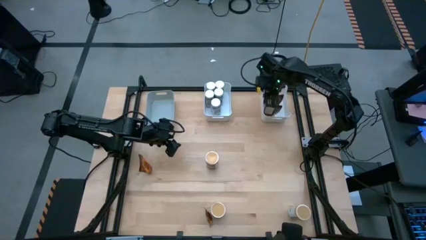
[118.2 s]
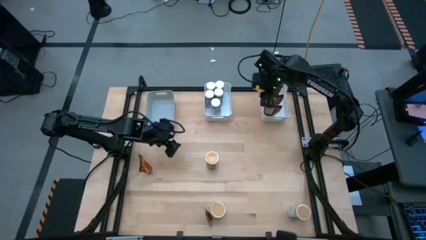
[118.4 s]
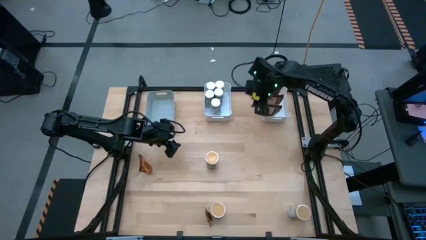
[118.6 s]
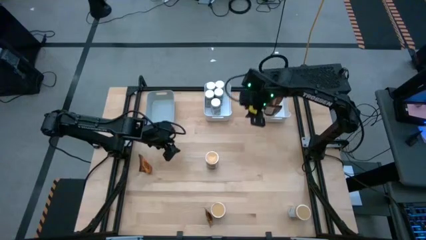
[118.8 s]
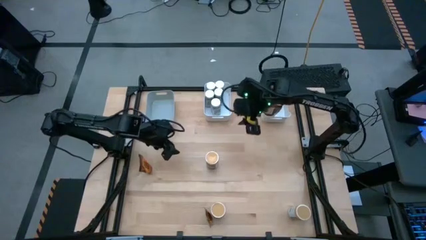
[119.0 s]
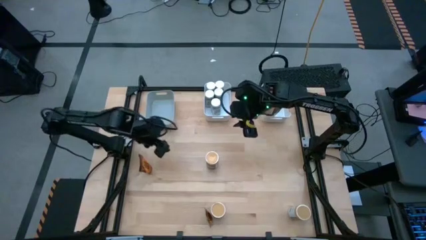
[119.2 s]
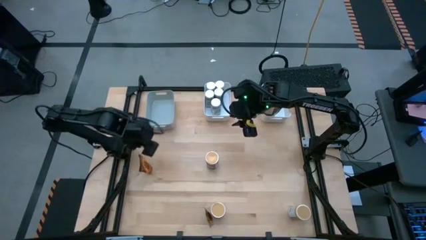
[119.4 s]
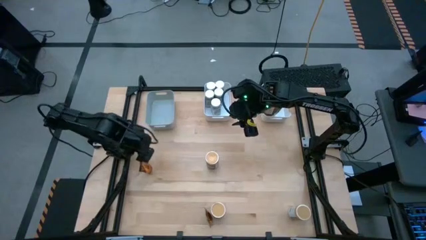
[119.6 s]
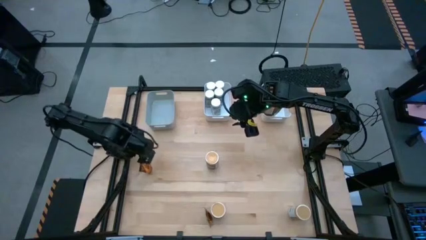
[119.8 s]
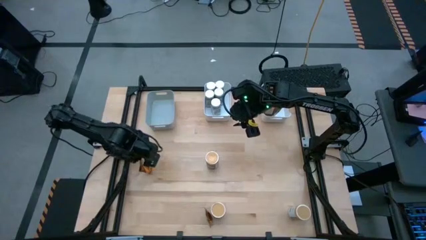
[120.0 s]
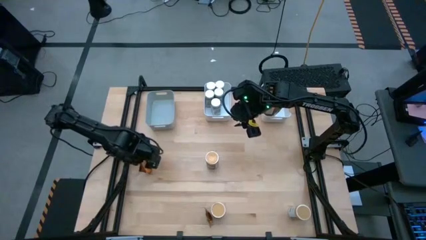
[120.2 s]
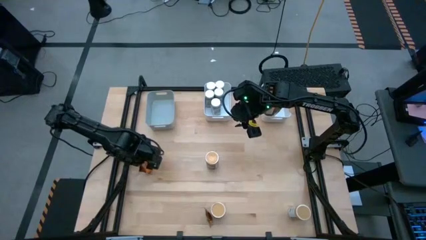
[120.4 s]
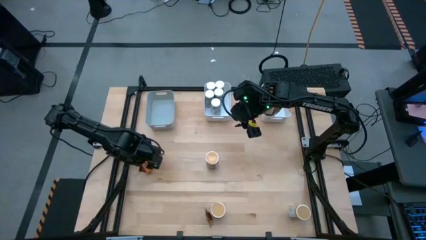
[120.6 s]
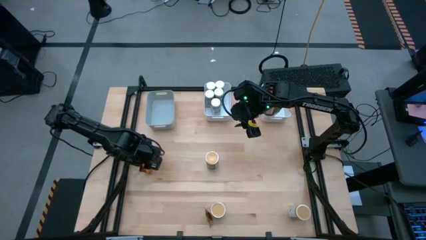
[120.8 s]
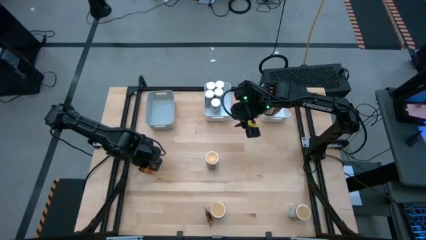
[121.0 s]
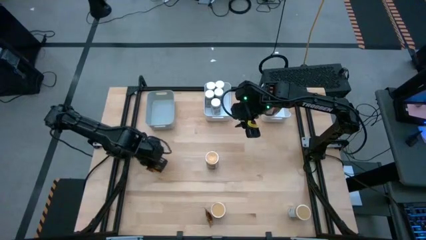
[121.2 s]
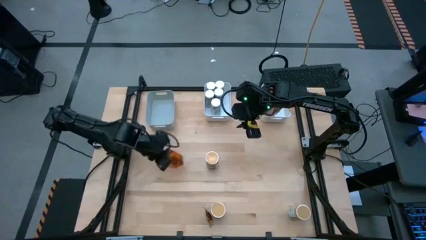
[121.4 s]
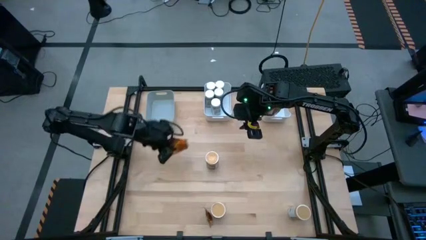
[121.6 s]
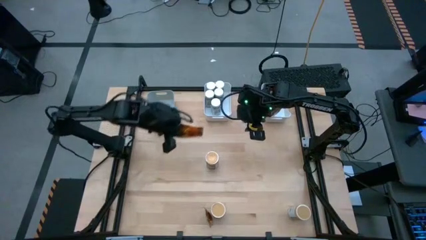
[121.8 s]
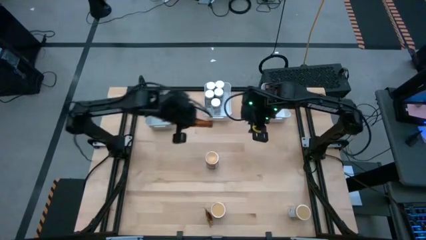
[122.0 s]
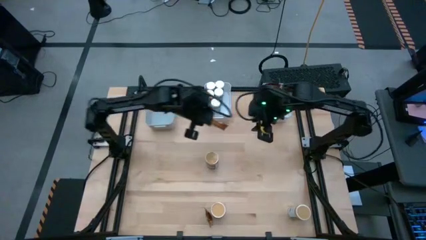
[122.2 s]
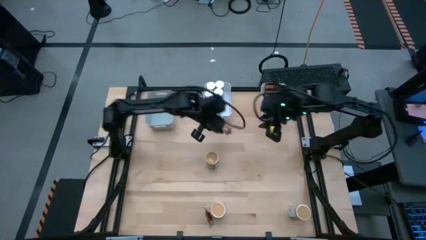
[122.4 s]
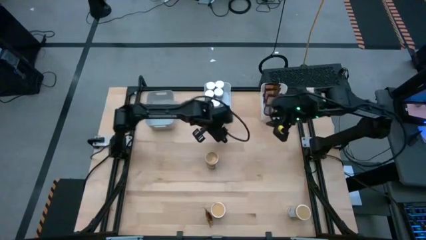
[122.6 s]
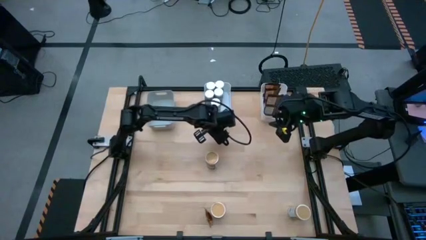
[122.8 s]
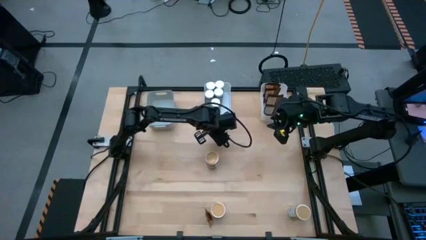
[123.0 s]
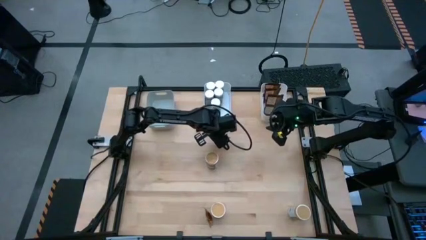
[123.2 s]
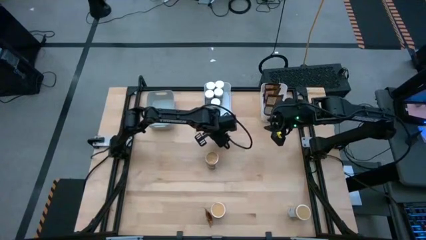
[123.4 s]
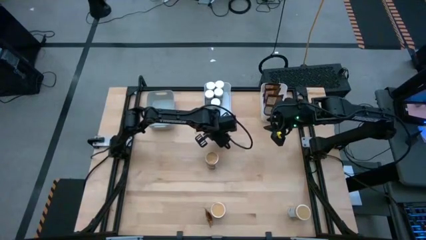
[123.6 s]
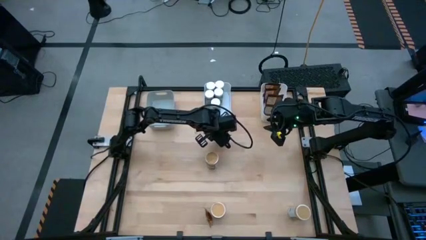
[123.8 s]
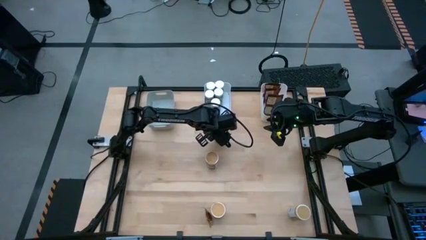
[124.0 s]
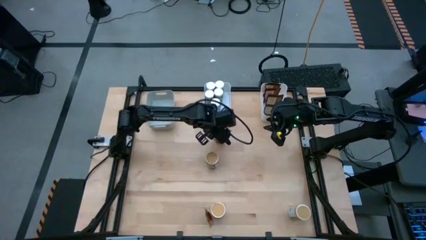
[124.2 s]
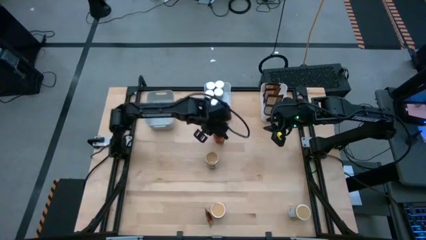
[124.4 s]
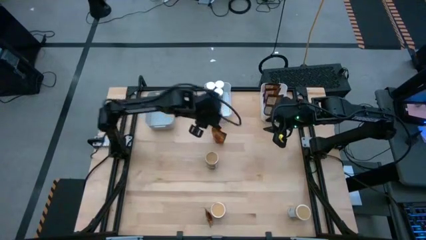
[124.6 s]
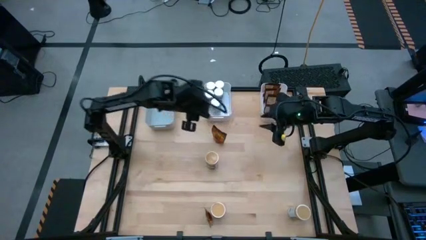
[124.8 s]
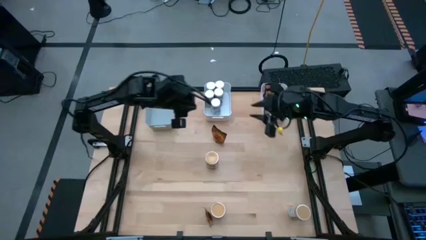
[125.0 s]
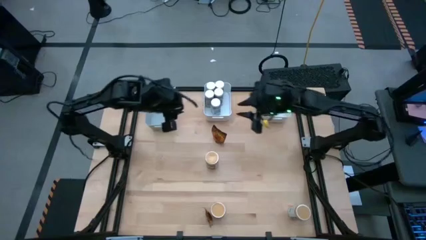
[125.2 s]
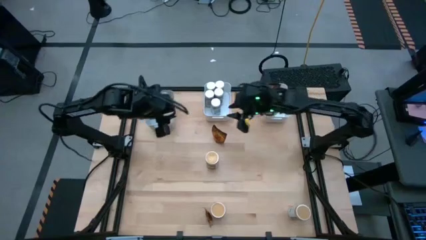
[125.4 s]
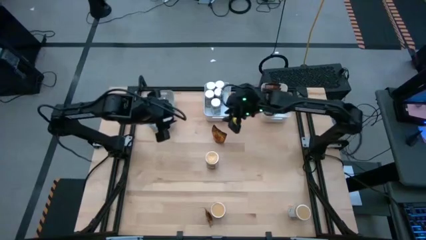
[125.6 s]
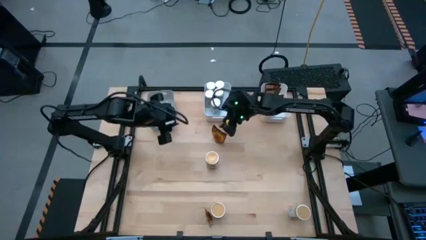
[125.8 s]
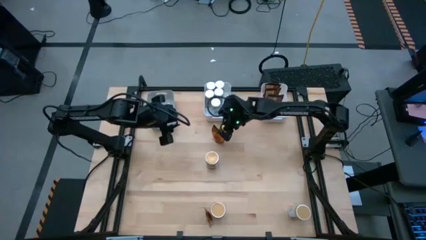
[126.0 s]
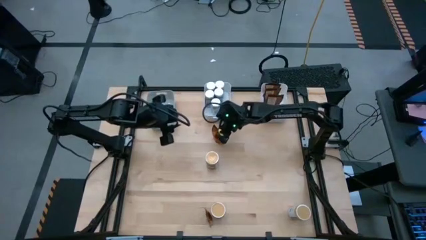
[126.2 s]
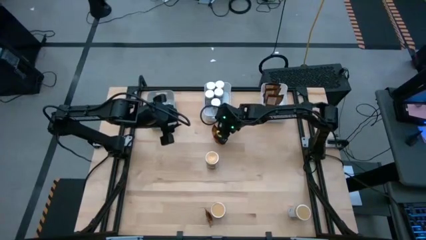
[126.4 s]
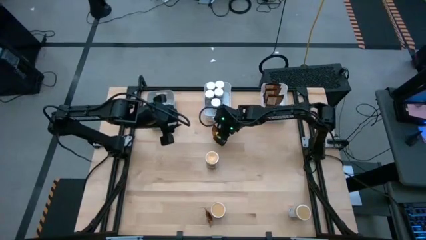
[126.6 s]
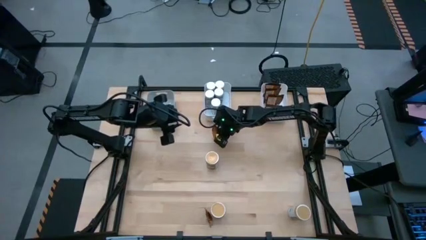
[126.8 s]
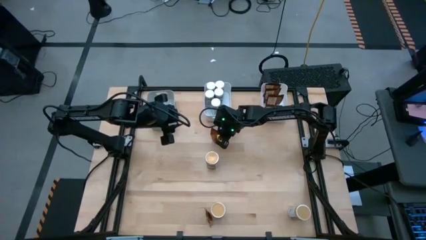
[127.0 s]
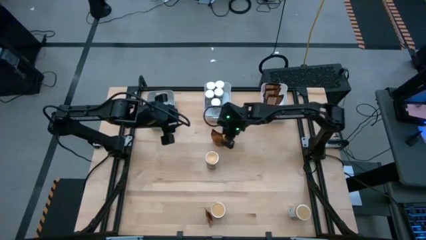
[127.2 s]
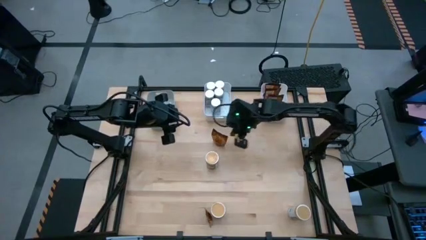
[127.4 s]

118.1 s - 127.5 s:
Task: Sort spices by type
Put the orange seasoning bag into the right white bin

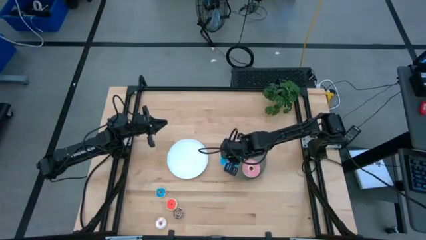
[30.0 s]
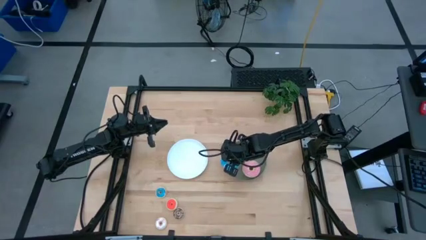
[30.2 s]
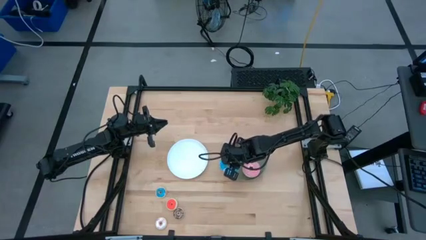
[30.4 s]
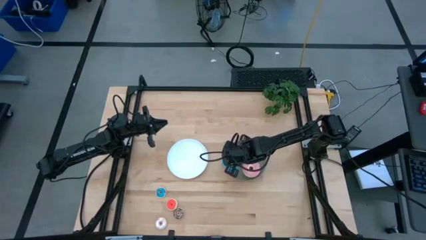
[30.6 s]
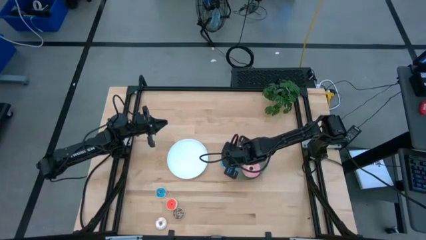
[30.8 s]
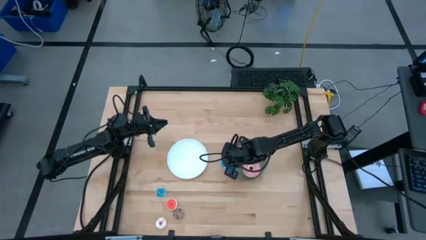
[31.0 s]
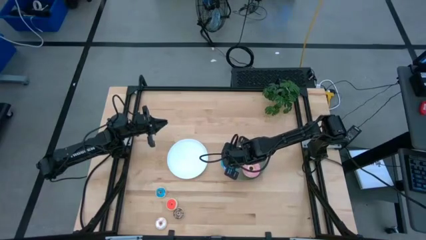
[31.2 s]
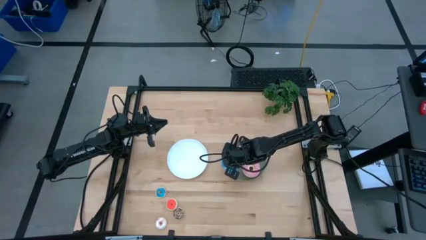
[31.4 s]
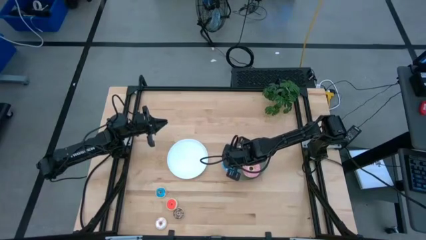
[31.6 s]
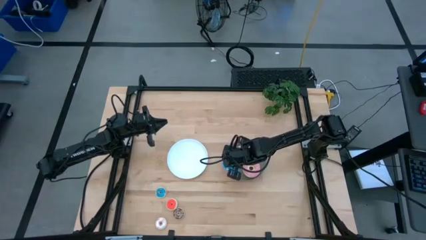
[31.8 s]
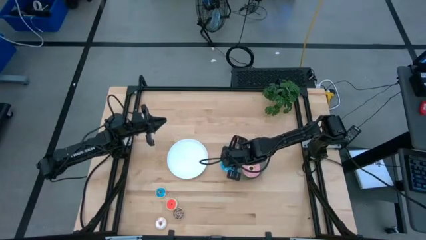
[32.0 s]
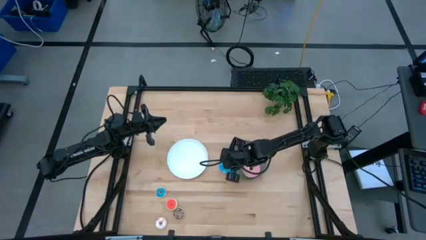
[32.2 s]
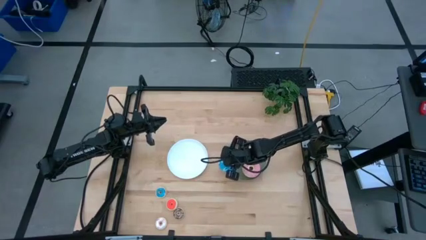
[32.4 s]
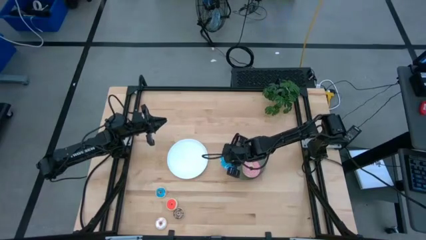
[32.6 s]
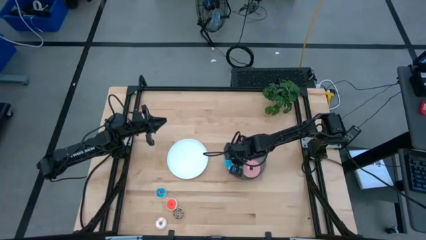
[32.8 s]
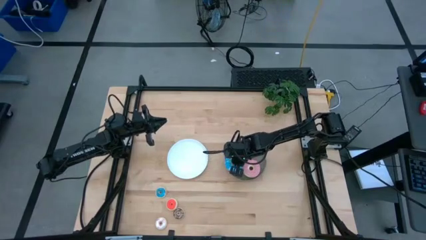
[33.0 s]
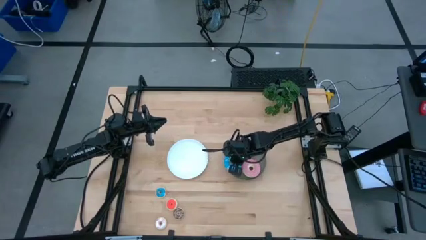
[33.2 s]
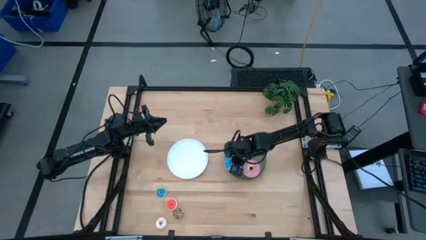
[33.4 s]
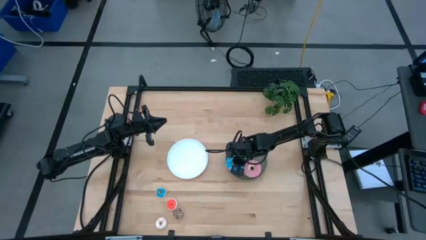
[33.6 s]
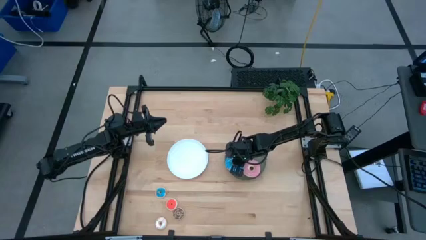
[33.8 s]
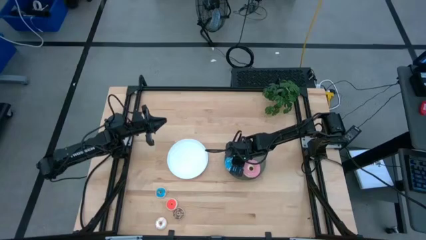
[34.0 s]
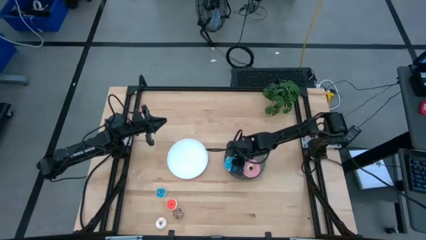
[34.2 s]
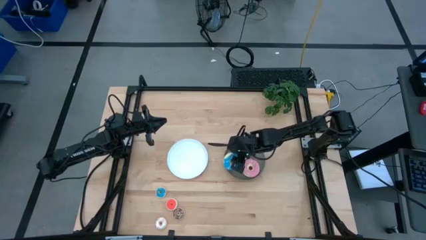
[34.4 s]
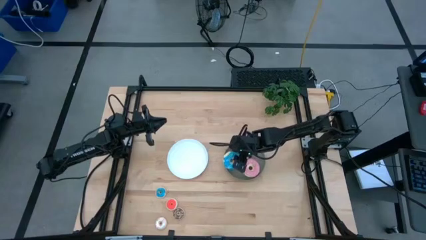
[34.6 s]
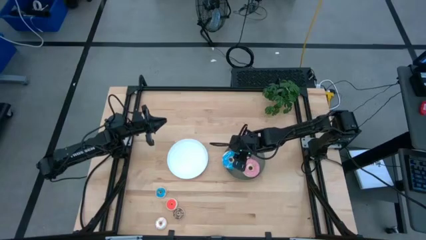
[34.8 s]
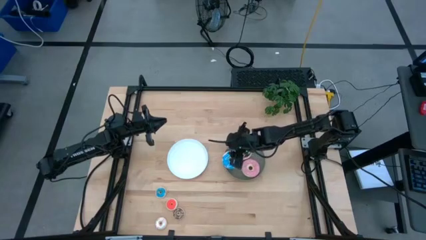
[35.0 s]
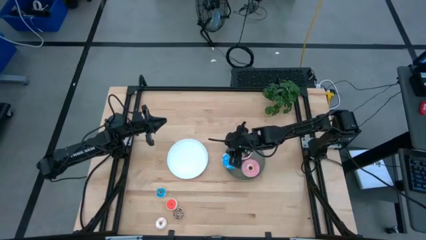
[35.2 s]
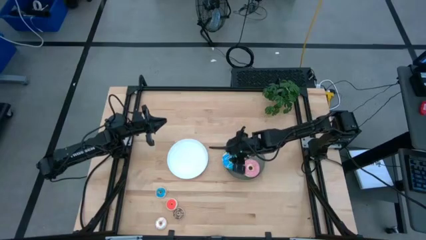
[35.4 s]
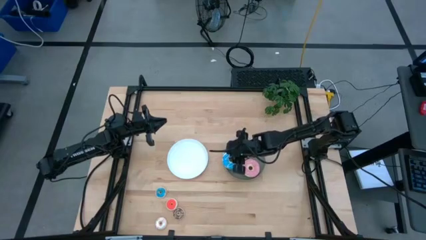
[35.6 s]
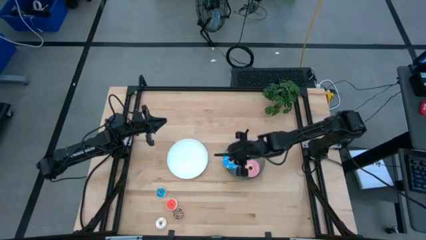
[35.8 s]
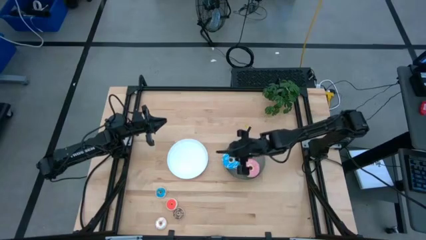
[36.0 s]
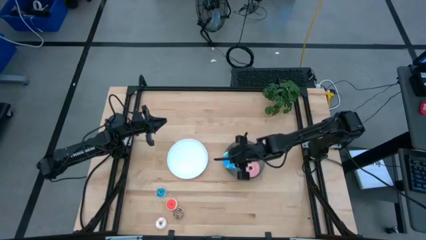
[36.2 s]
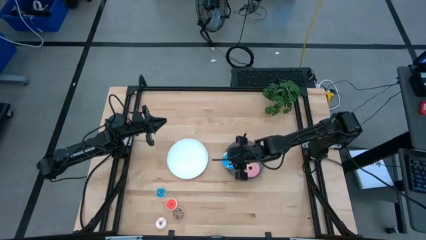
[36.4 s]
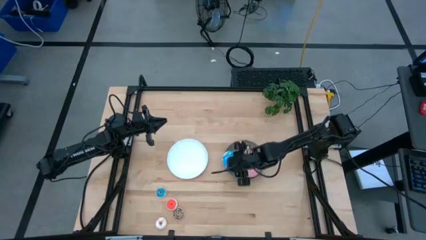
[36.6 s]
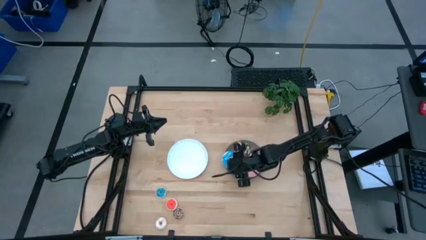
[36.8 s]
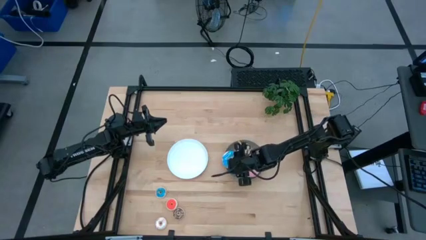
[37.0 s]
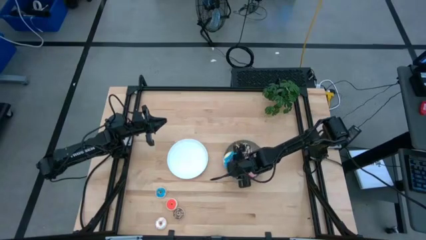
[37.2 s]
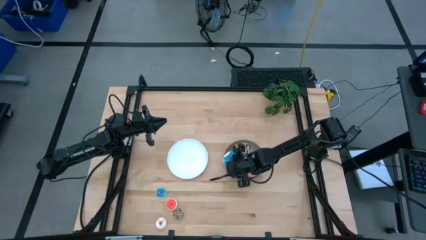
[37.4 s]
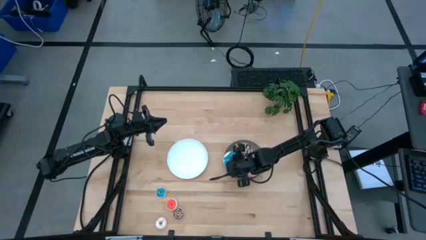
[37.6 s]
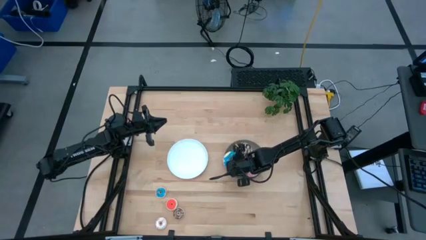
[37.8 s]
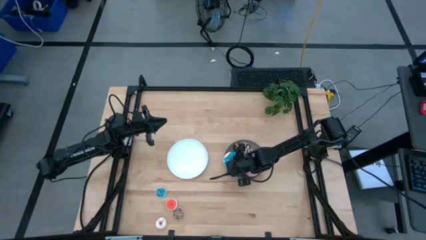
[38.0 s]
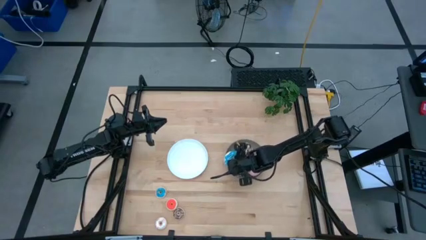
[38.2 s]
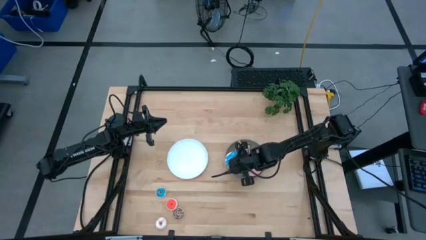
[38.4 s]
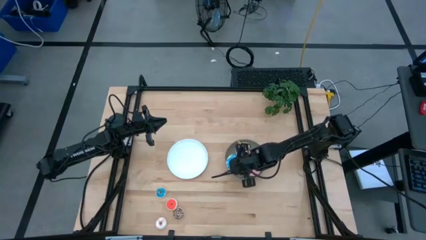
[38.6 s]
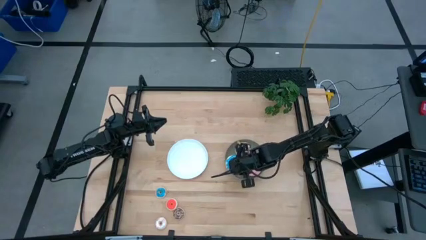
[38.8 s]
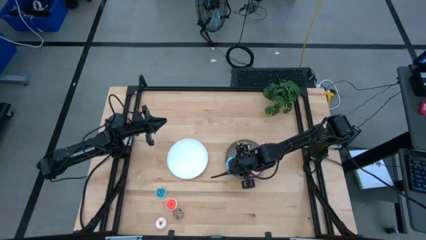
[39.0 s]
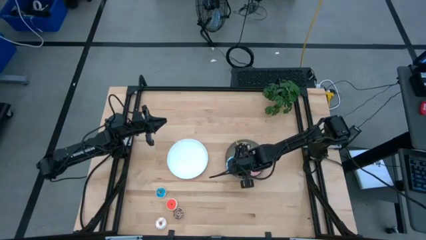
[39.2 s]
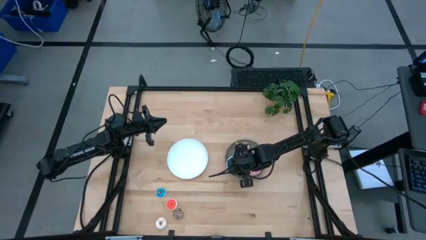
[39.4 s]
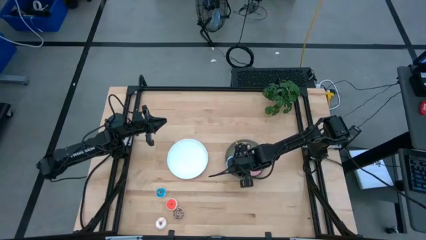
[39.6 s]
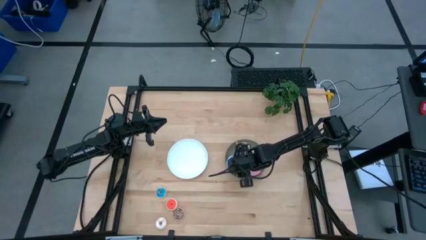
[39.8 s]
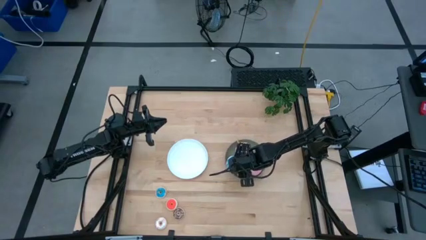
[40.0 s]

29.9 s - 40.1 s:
Task: Pick & Place donuts
Put the large blue donut on the gray plate
